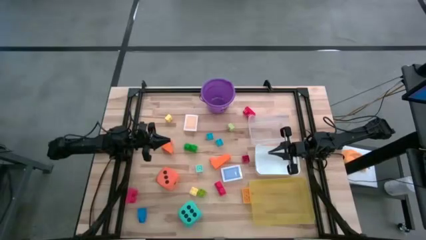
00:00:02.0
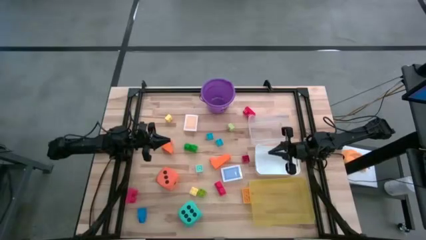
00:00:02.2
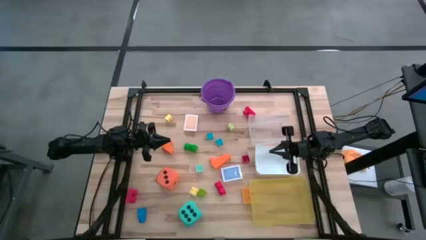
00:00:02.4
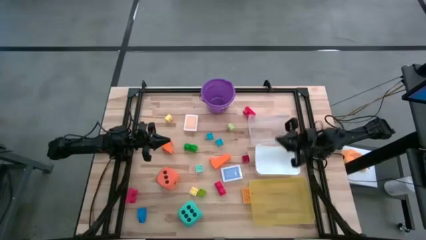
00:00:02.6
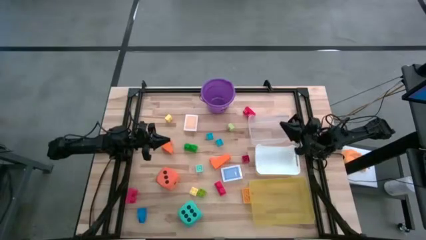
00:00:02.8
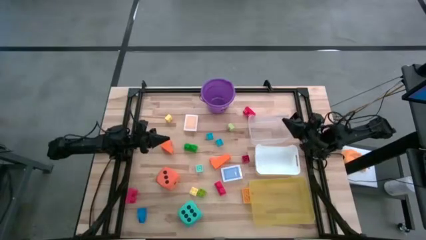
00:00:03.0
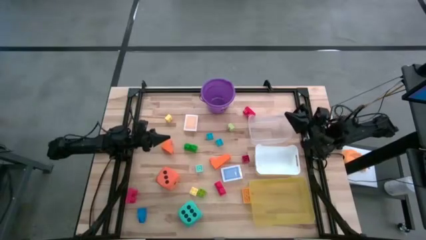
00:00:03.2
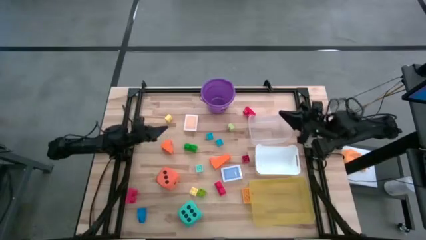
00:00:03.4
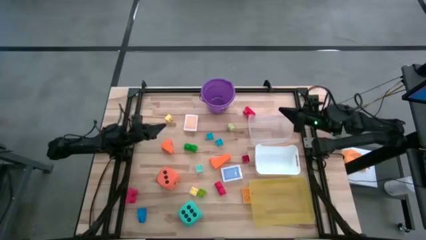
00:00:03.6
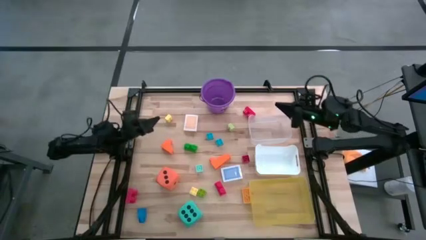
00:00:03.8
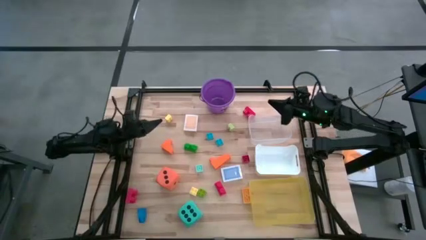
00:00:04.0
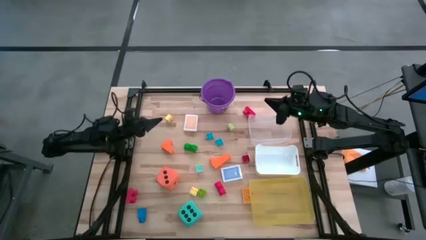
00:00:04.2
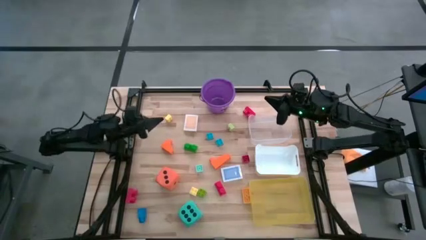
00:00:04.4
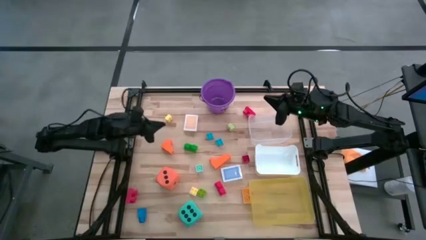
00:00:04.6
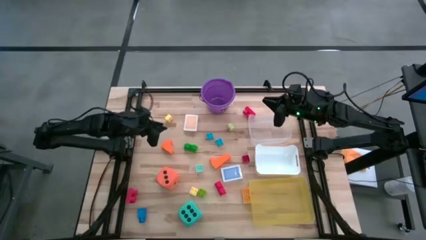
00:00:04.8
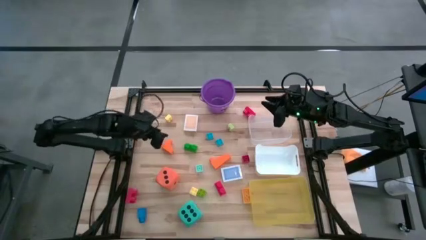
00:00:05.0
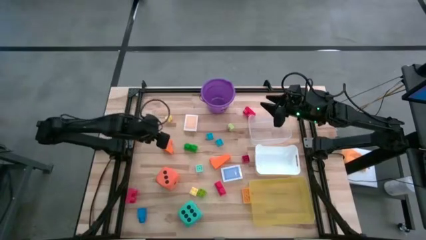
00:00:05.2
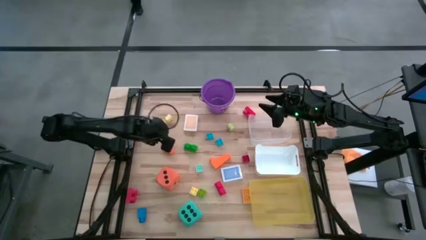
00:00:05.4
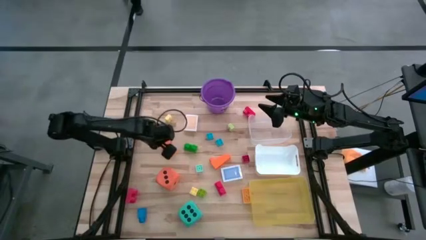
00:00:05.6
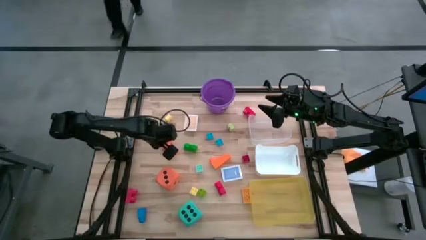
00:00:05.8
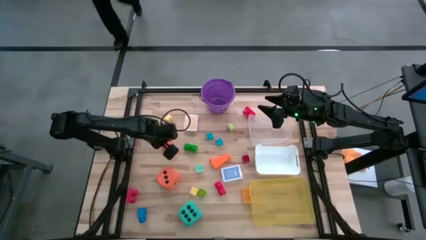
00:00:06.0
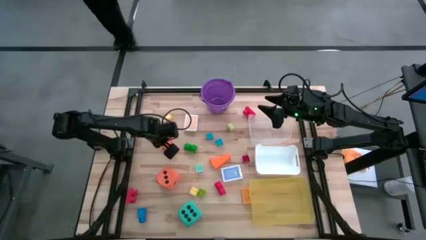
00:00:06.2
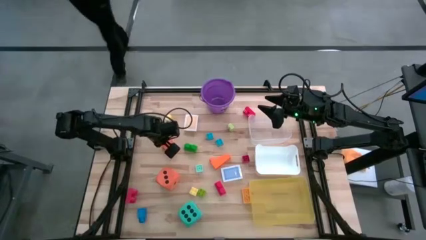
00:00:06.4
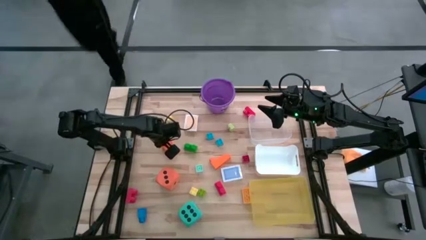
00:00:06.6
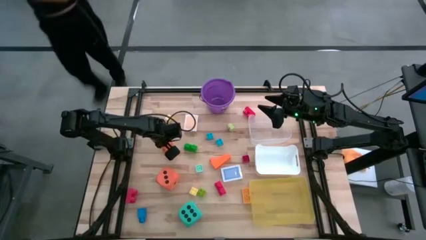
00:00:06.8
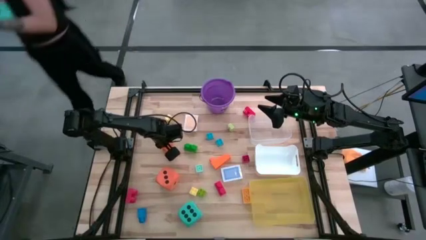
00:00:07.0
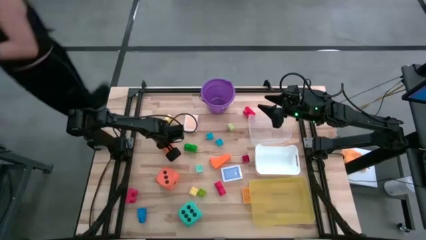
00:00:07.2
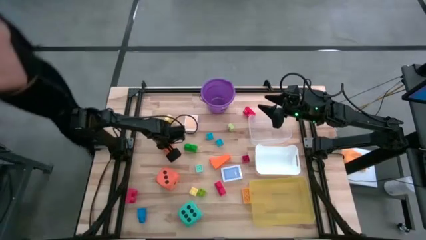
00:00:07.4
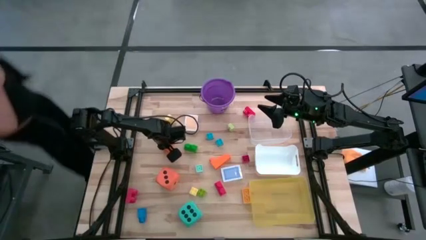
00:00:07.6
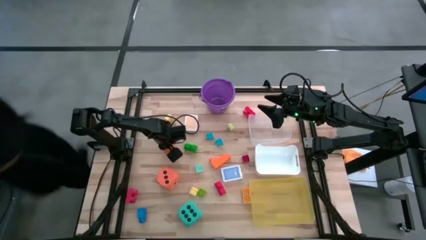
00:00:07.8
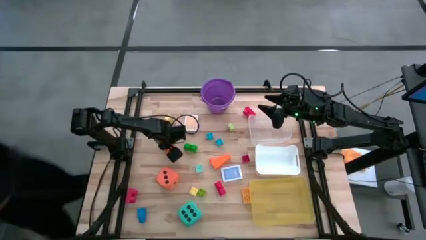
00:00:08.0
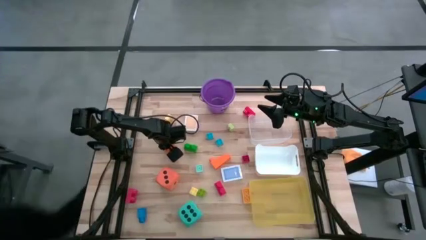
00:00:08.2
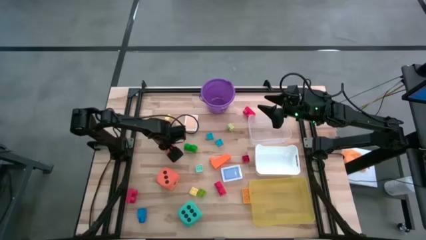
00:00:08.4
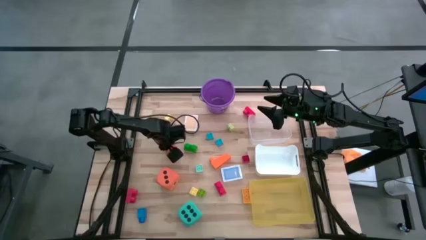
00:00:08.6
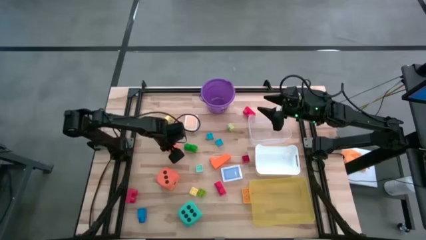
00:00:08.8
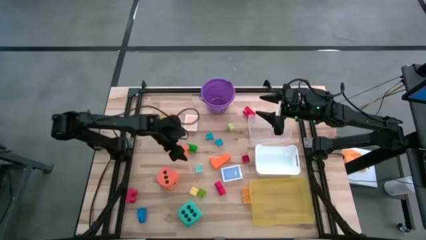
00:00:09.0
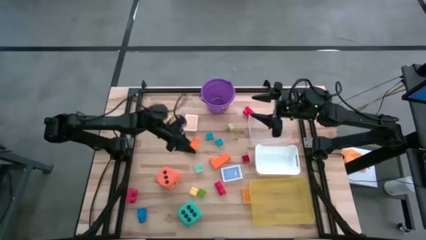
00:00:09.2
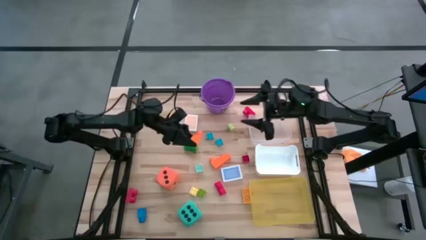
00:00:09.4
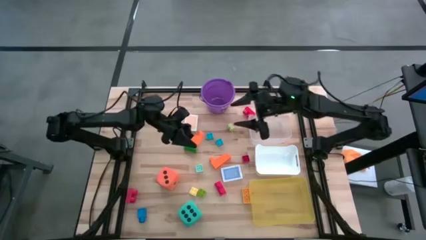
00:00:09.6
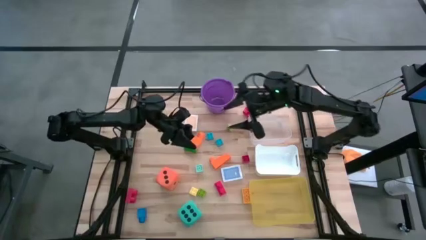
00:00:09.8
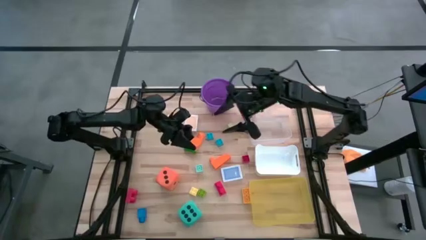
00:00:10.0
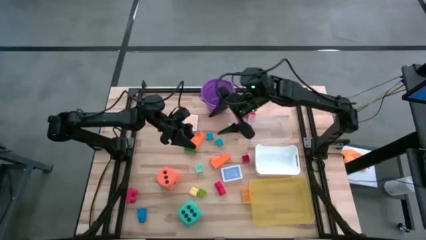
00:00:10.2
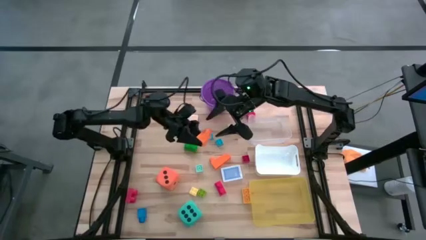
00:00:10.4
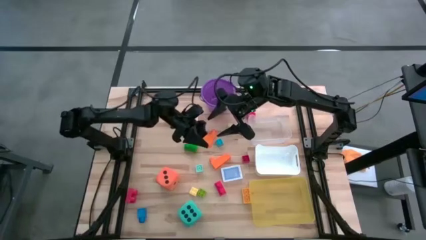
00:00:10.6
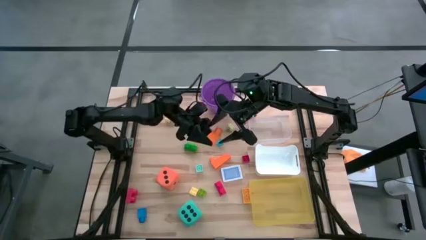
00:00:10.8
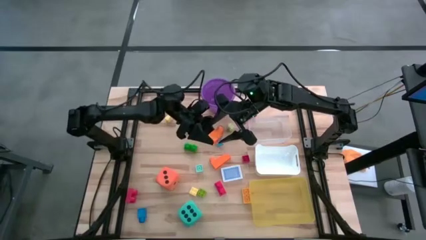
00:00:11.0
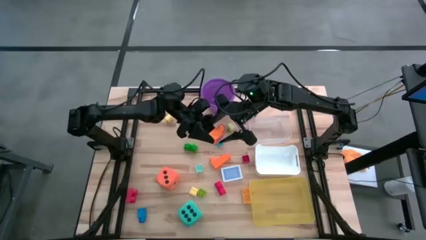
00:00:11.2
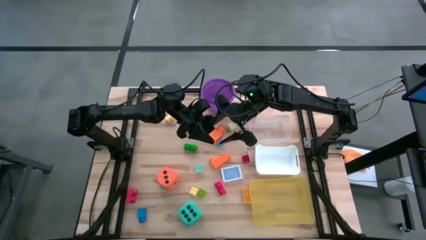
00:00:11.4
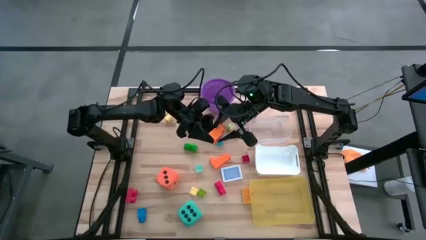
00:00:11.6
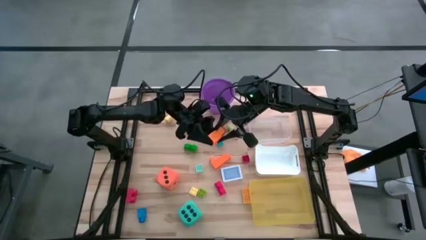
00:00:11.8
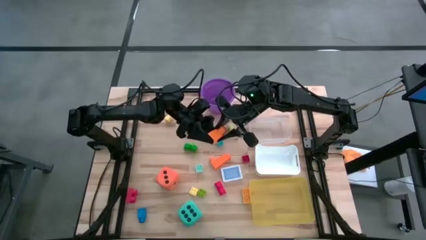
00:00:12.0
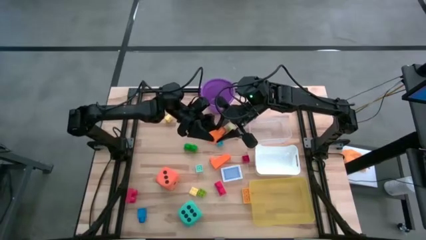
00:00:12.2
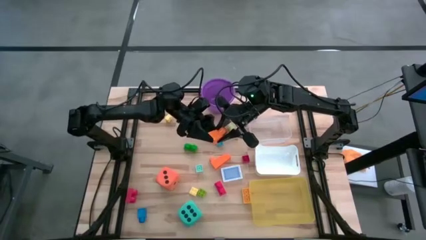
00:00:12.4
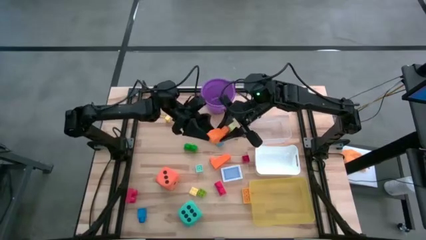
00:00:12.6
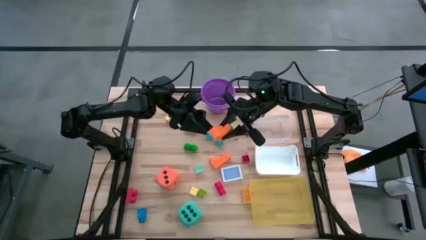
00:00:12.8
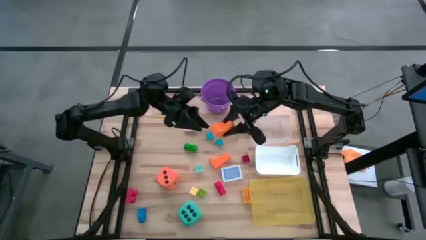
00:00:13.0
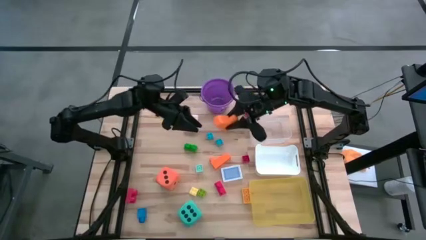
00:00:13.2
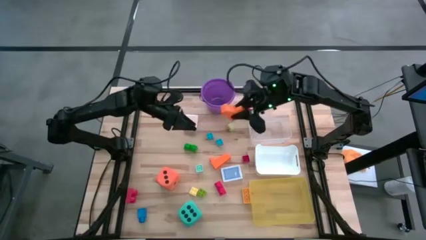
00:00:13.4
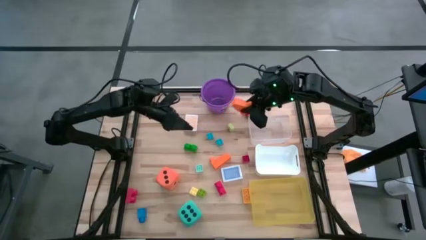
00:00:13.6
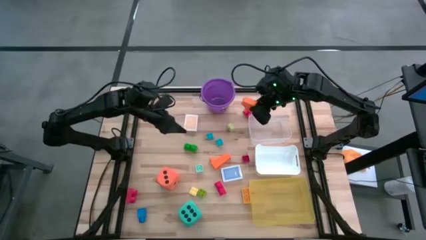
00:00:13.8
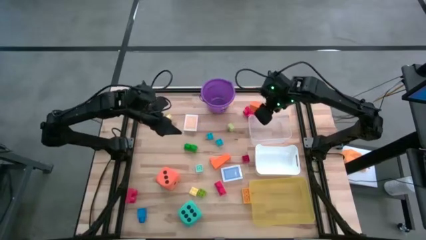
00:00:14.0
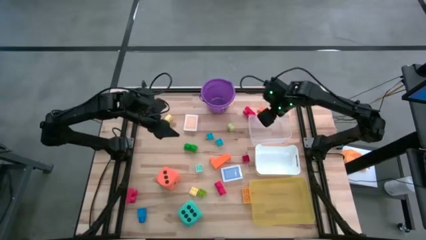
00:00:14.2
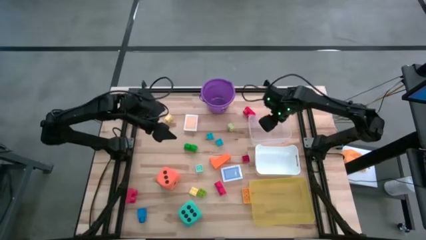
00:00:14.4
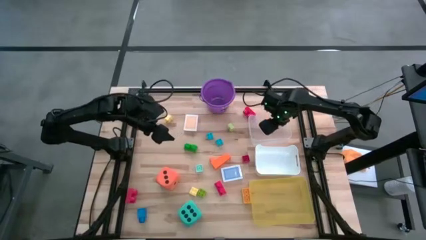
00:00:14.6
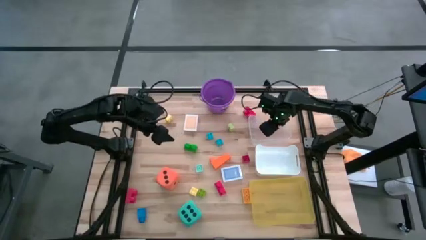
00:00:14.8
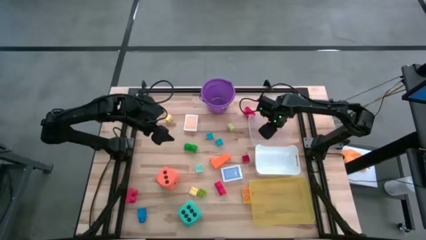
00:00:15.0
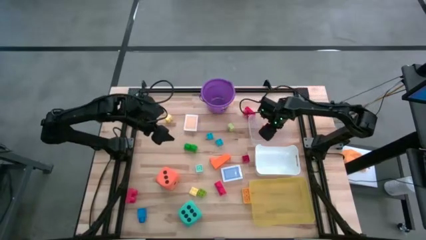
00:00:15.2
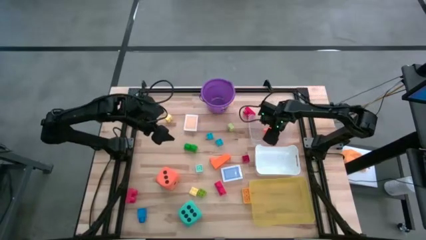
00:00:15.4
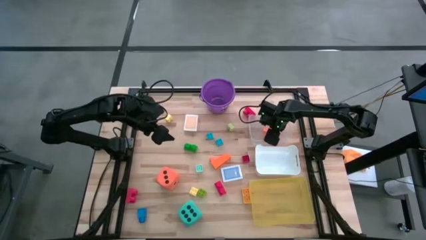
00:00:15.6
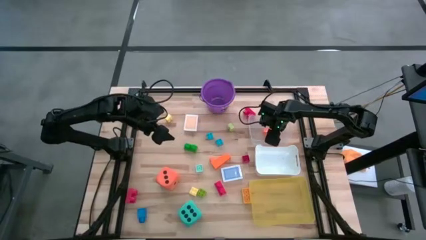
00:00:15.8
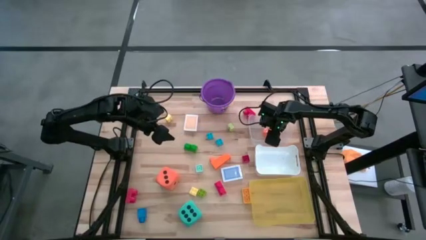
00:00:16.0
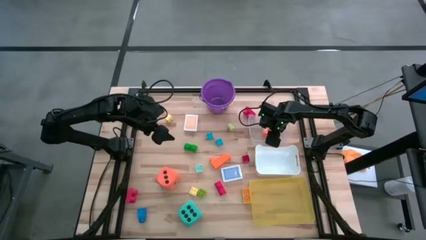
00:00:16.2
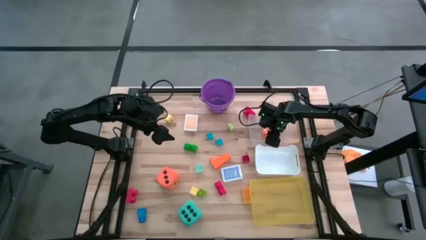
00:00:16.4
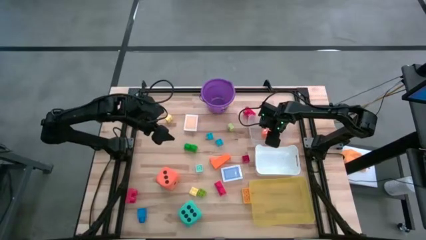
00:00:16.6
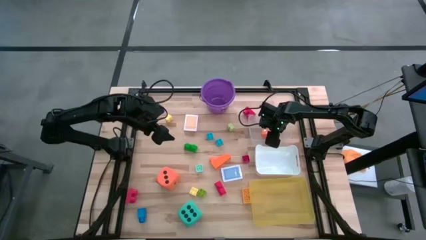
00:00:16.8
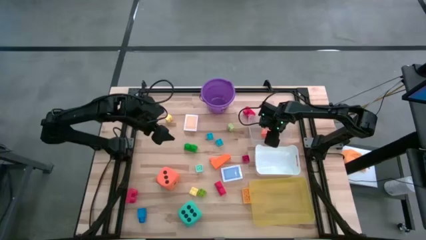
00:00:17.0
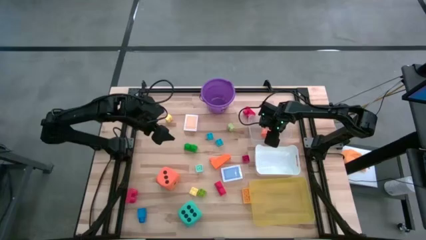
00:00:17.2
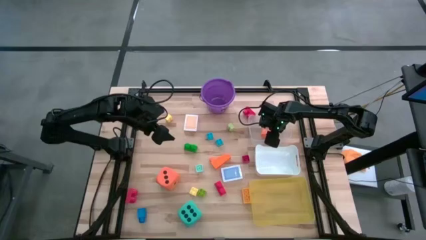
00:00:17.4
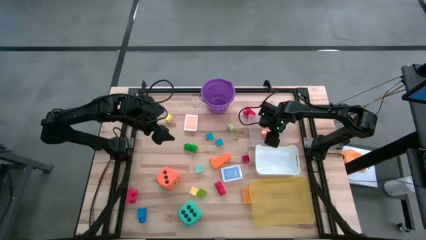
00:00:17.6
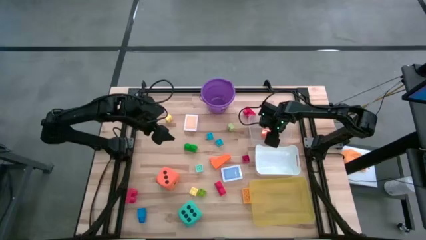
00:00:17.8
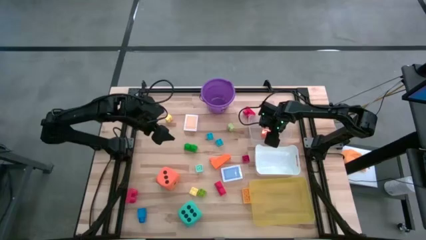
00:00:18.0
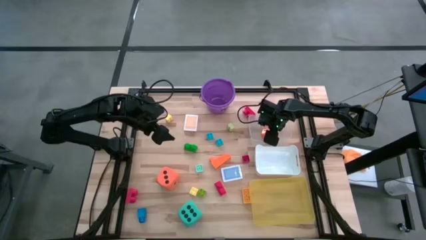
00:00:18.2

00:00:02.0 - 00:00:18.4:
Task: Pick & Place Toys
Put the orange game piece into the transparent bin
